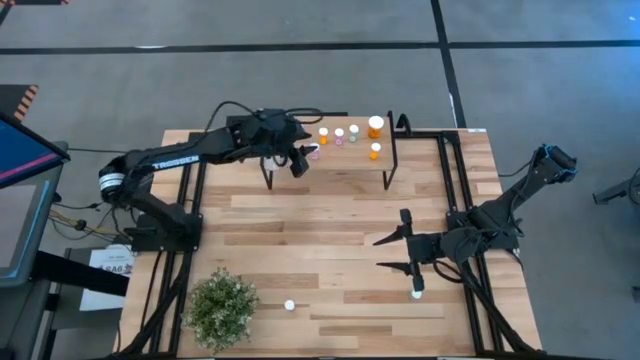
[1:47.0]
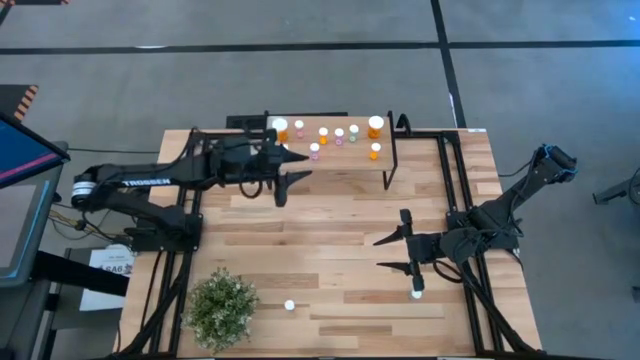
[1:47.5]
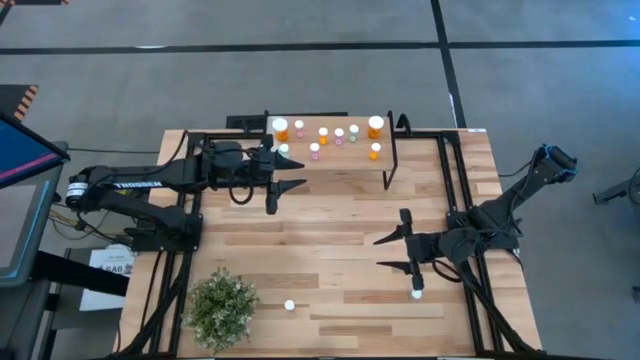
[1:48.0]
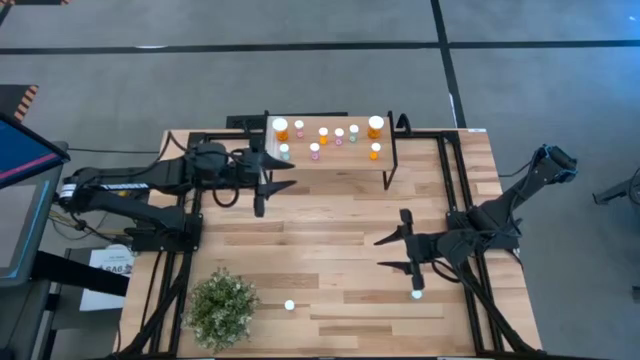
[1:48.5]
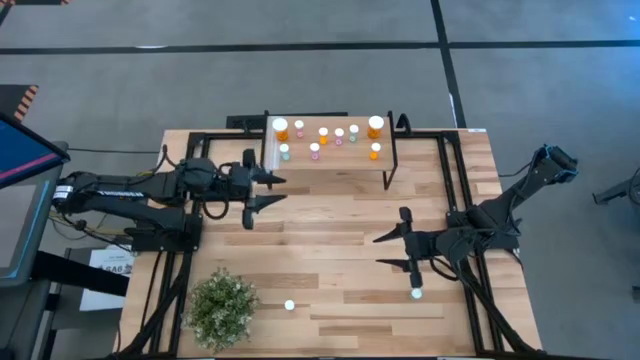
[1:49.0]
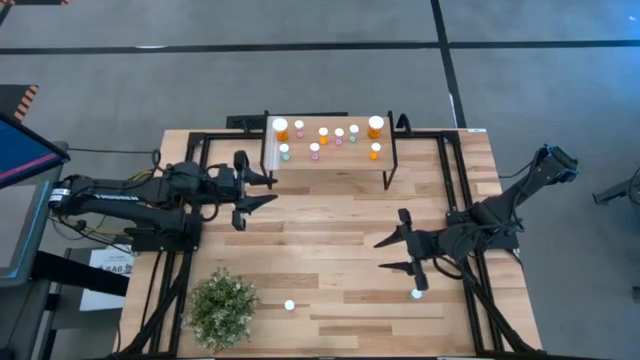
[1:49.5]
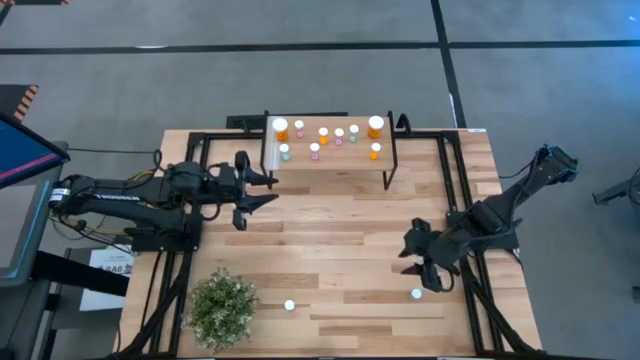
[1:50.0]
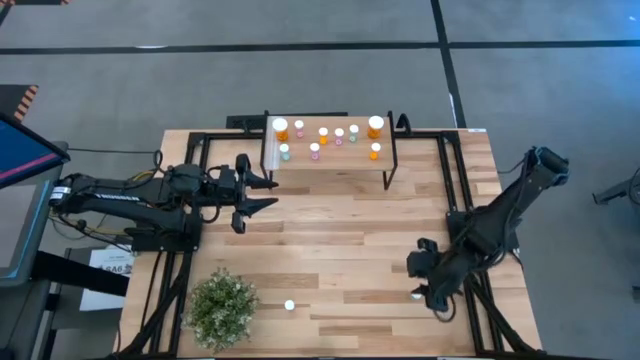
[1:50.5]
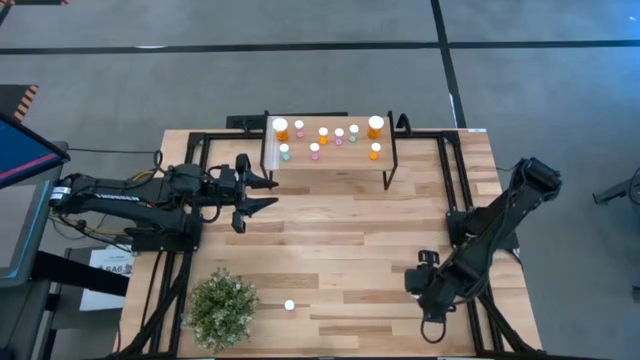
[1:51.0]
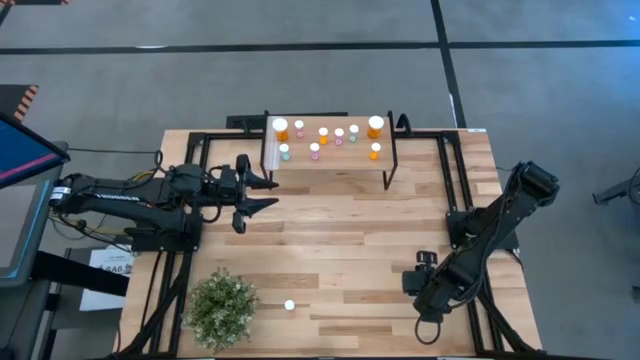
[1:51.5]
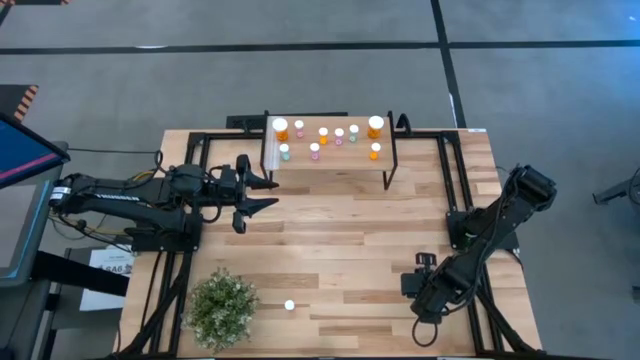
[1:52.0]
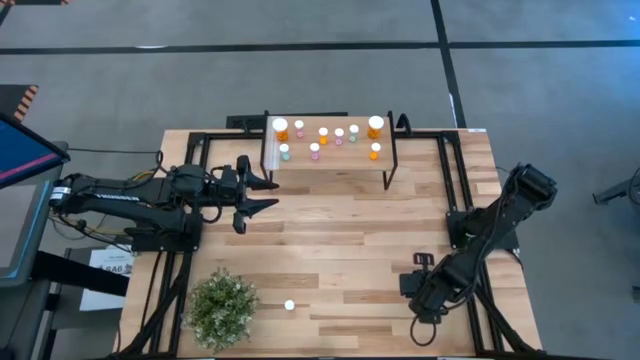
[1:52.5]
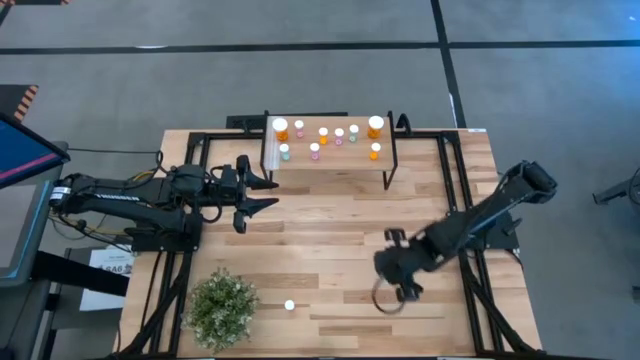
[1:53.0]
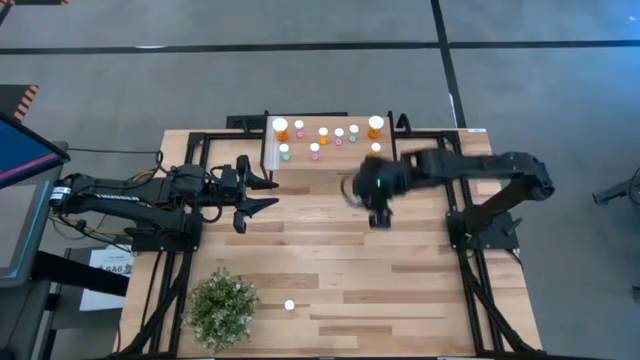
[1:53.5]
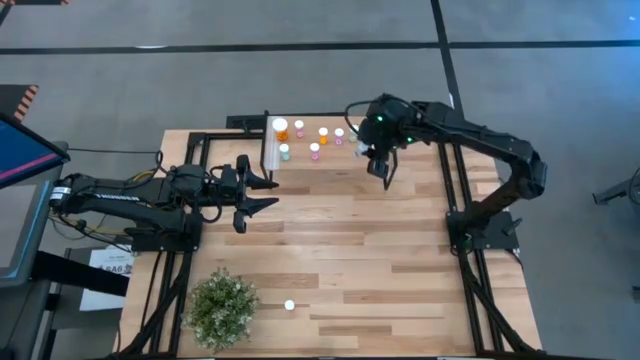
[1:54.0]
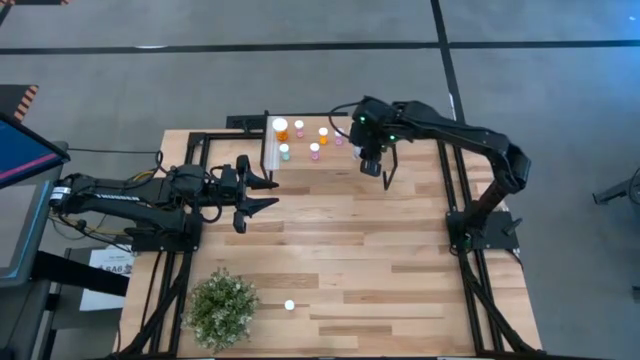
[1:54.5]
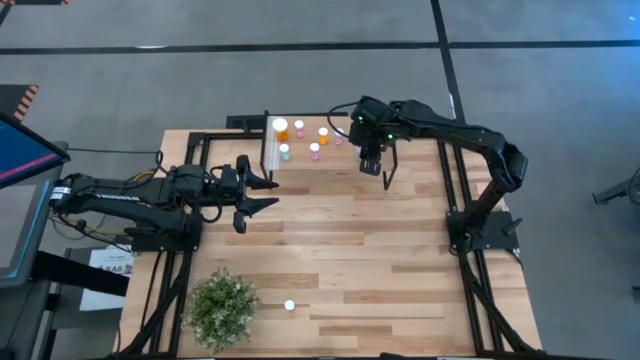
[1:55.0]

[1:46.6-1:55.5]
Task: Pick and place medicine bottles onto shelf by color
Put the green pill bottle on the shelf

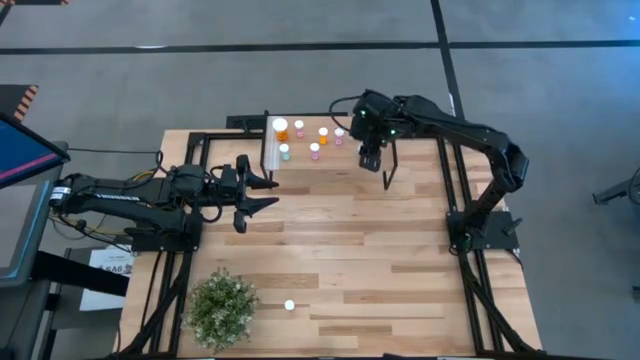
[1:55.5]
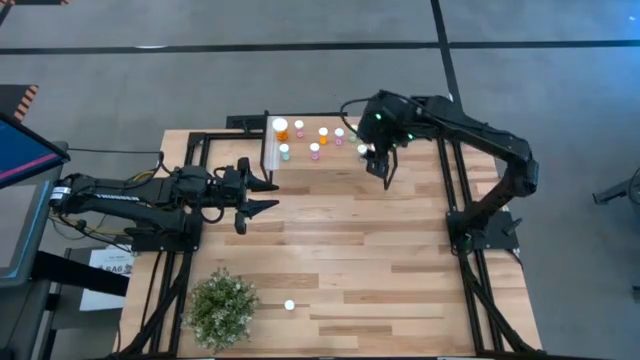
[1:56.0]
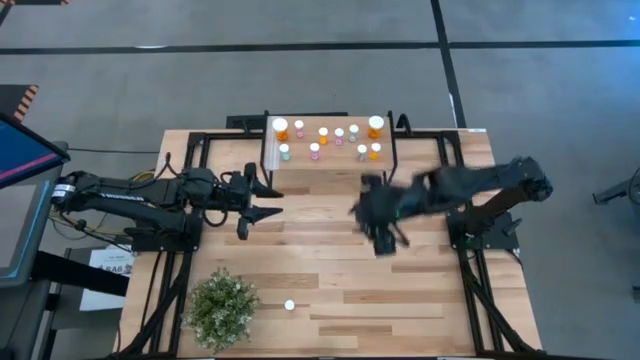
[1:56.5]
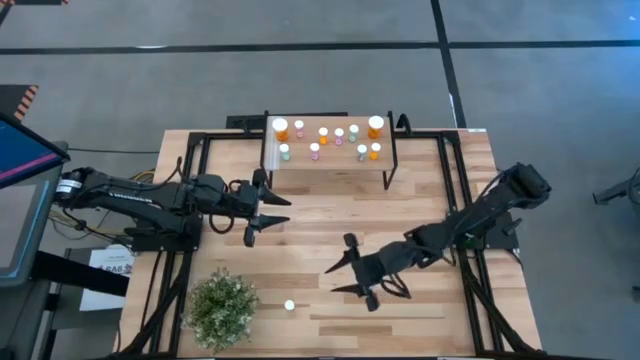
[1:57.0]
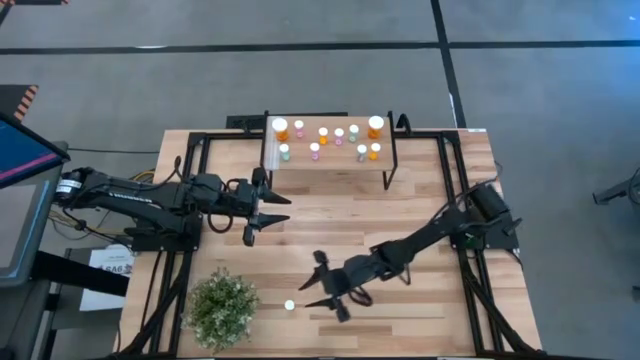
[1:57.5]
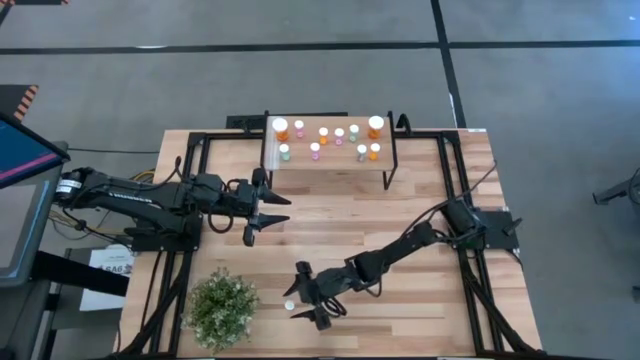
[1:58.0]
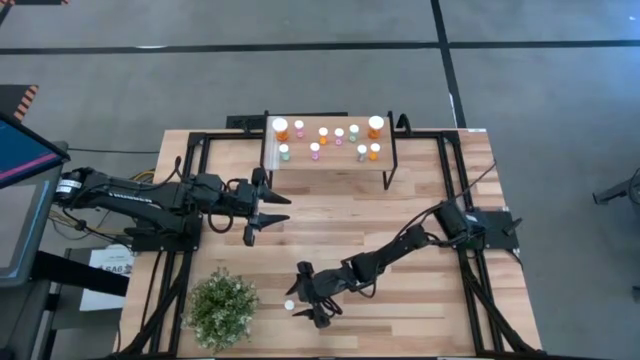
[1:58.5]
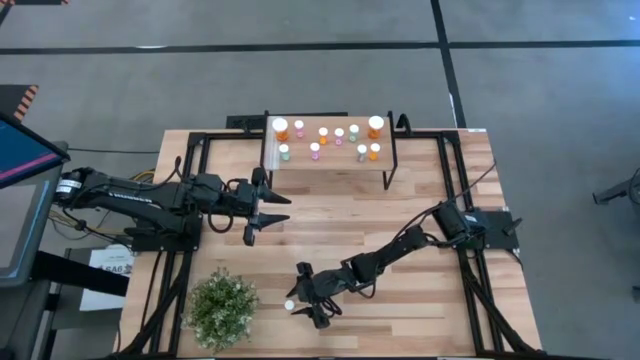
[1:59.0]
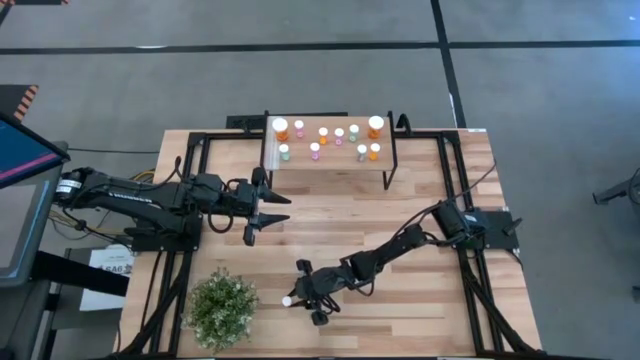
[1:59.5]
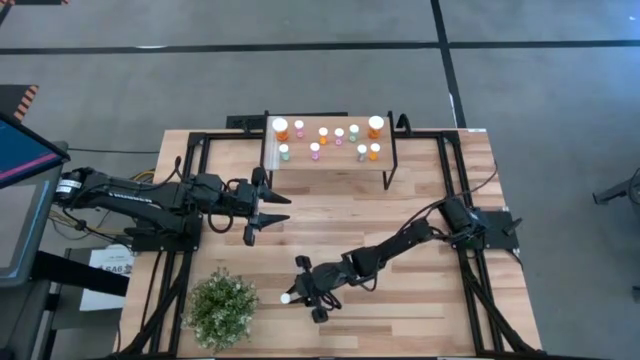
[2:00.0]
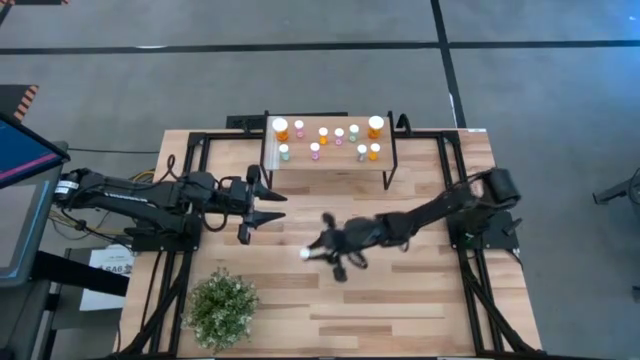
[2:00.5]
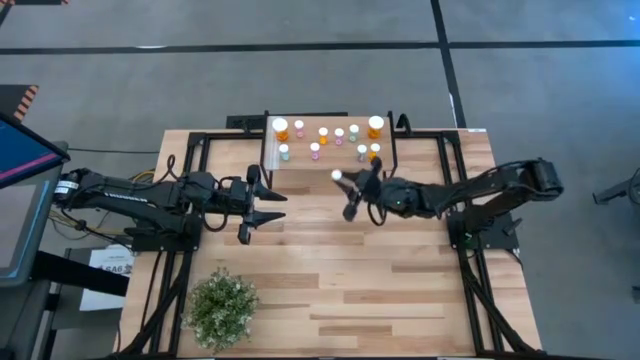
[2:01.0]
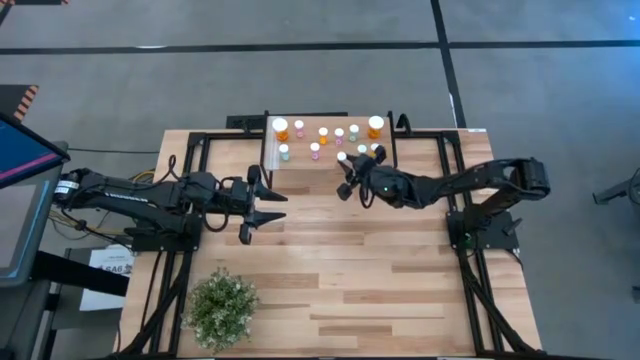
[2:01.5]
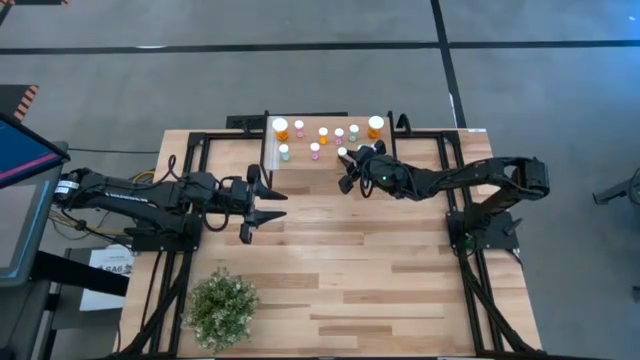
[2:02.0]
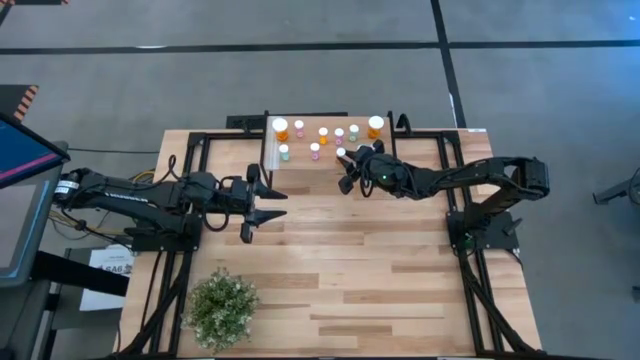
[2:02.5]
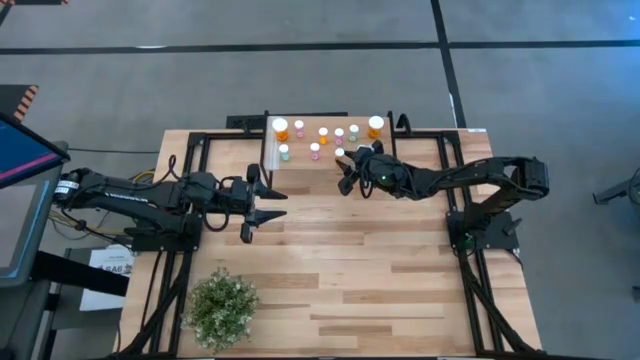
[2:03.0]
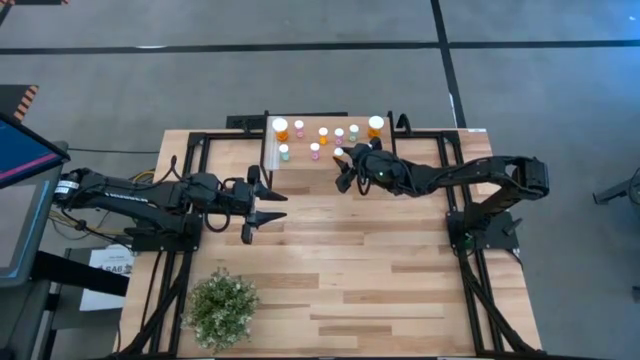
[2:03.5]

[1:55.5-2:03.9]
Put the orange pill bottle on the shelf

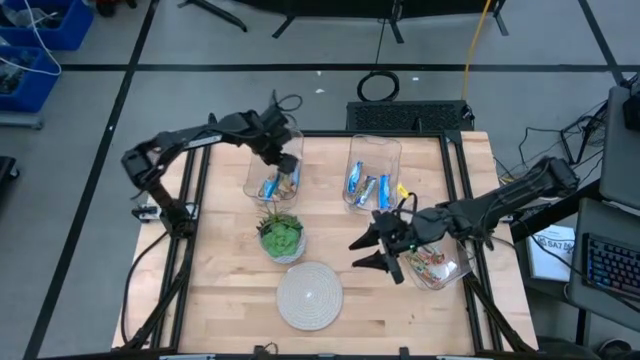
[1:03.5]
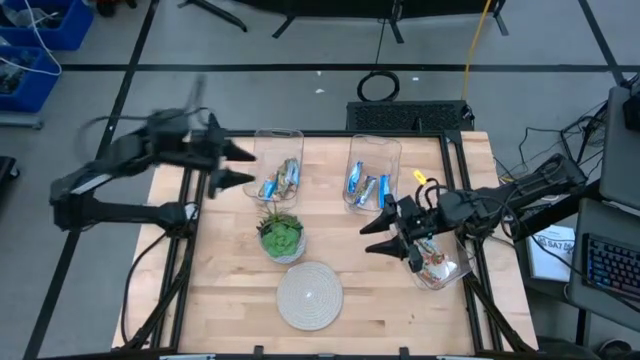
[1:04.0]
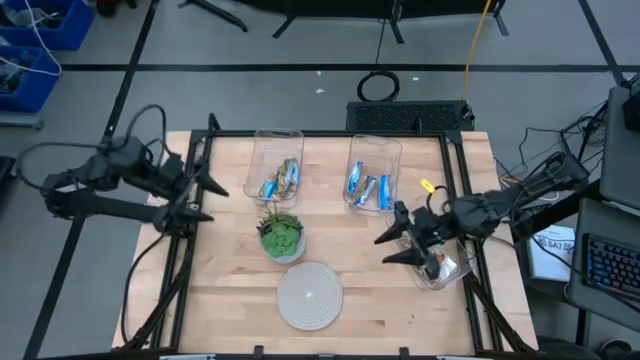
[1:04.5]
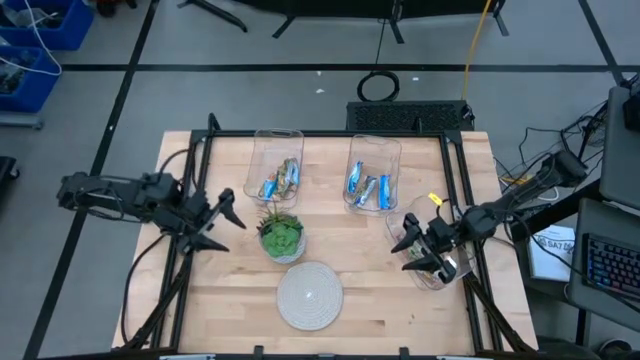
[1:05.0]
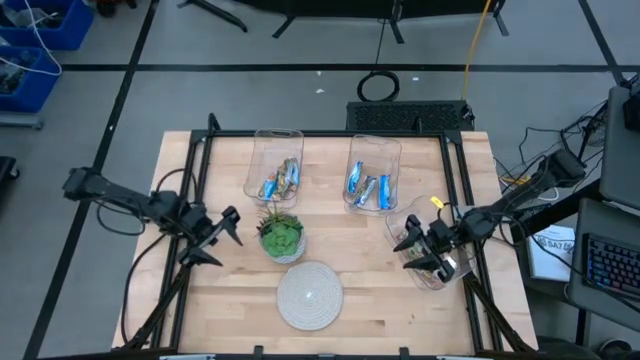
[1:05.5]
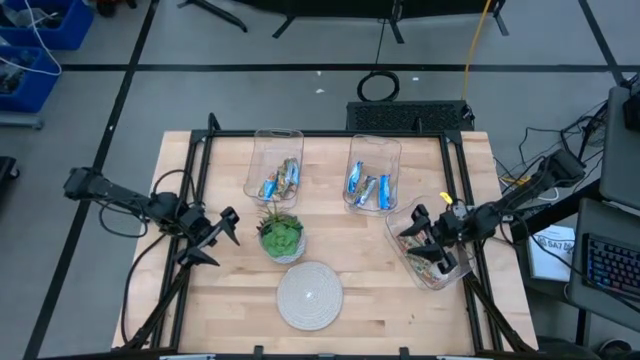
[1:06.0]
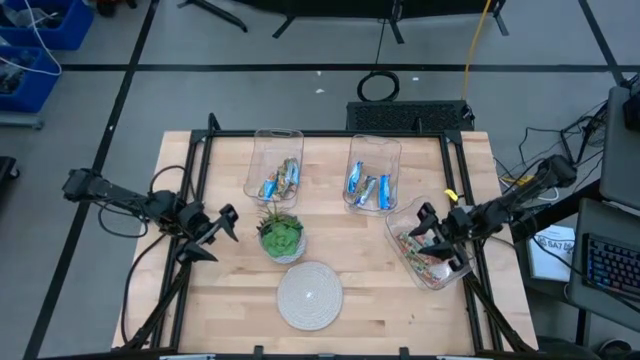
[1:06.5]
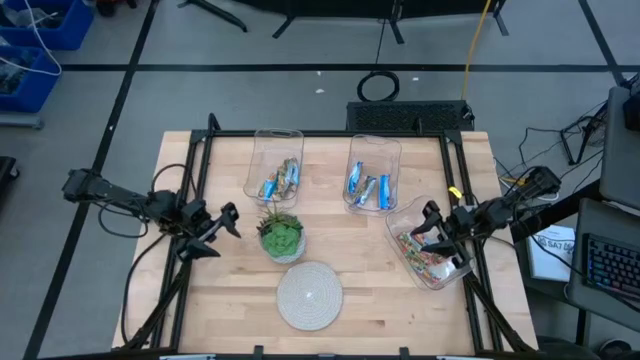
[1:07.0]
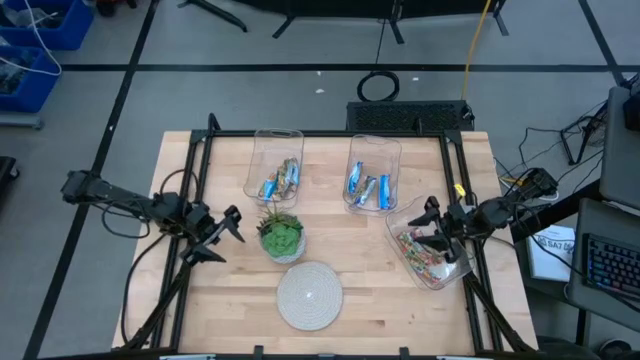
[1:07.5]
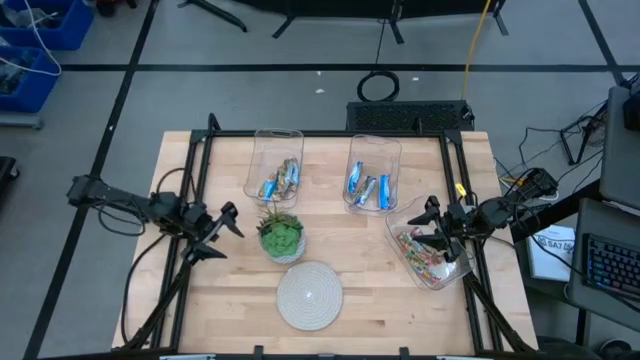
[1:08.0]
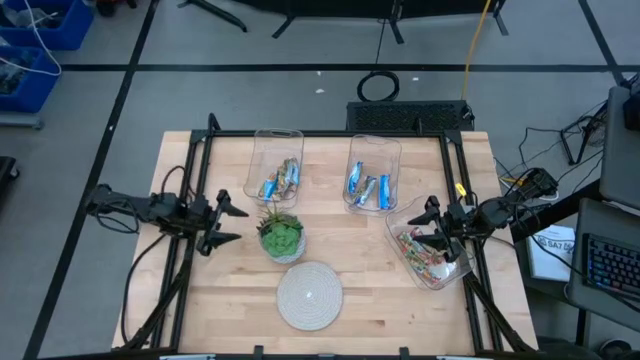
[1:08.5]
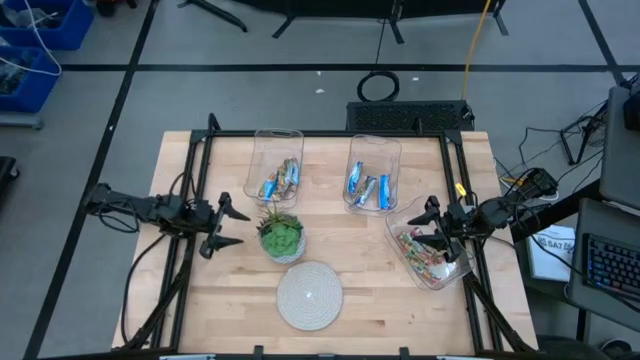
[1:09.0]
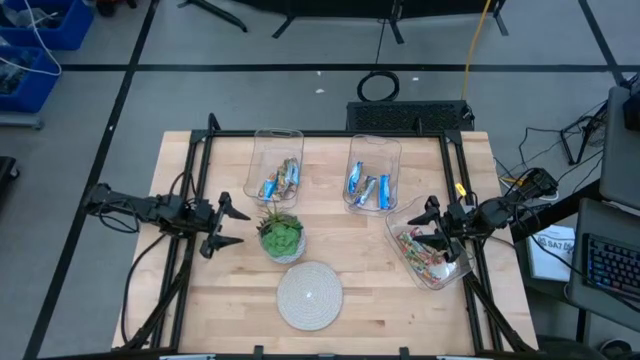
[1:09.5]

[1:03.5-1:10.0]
Task: Pick and place Granola Bars by type
Return to Home Position
